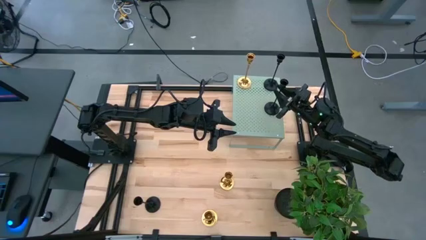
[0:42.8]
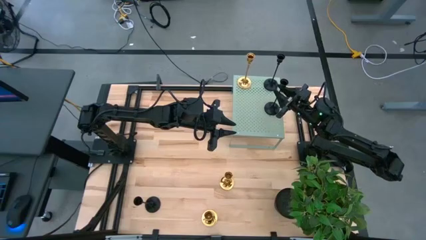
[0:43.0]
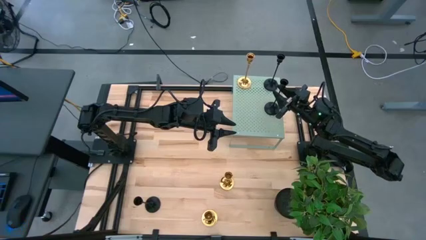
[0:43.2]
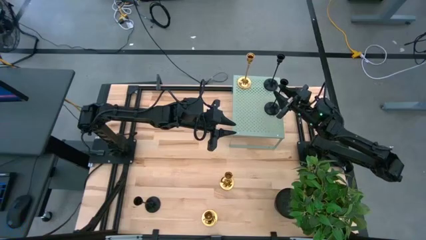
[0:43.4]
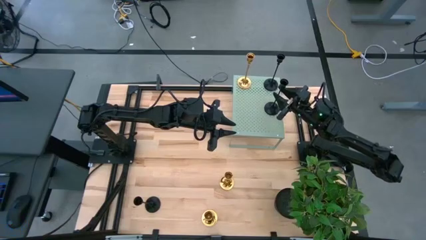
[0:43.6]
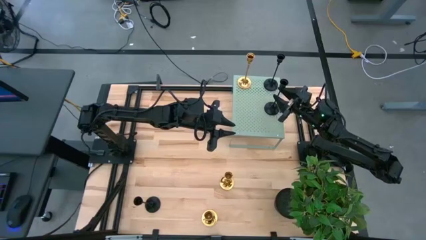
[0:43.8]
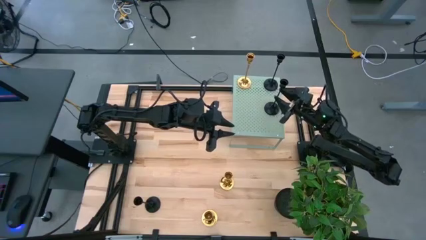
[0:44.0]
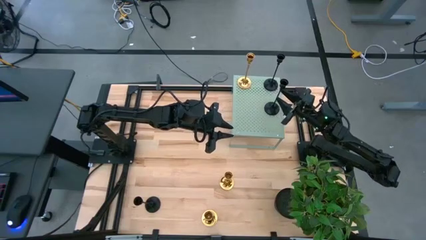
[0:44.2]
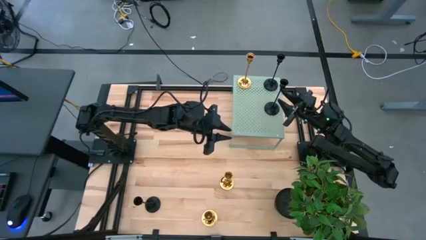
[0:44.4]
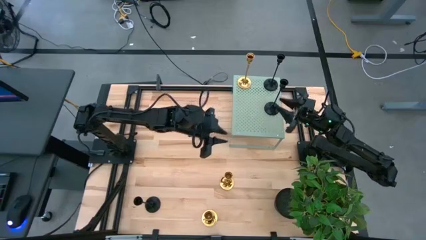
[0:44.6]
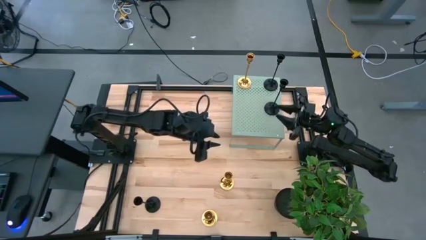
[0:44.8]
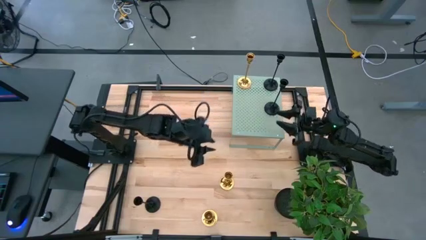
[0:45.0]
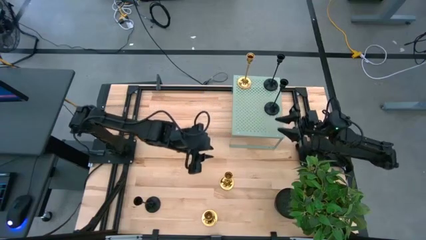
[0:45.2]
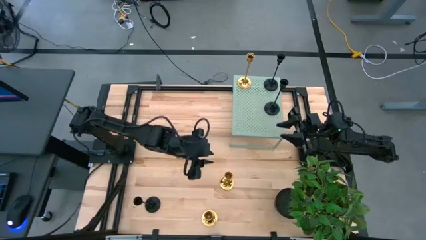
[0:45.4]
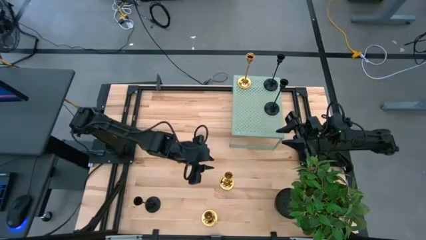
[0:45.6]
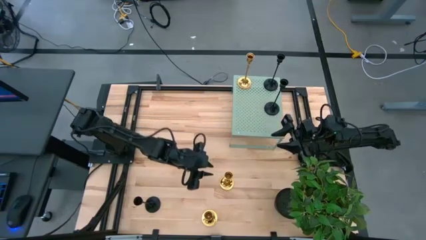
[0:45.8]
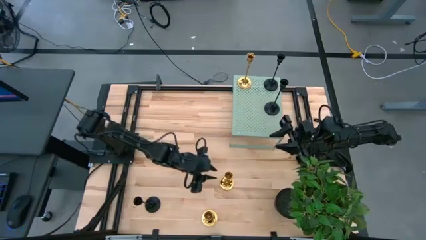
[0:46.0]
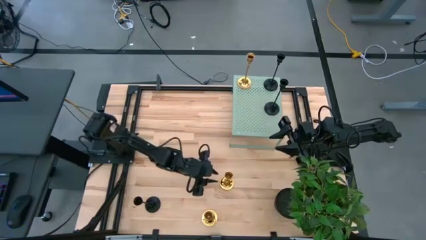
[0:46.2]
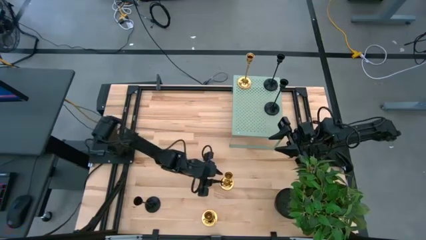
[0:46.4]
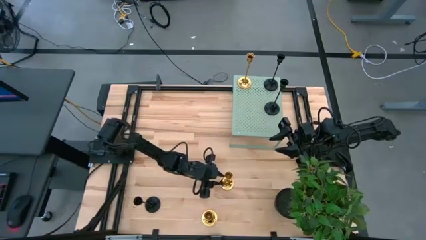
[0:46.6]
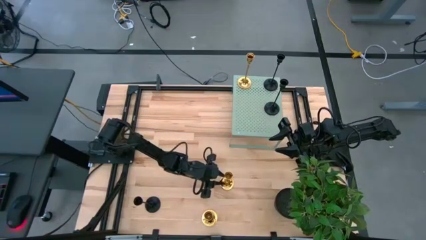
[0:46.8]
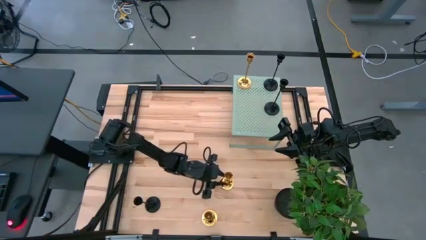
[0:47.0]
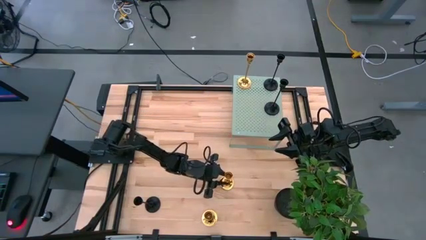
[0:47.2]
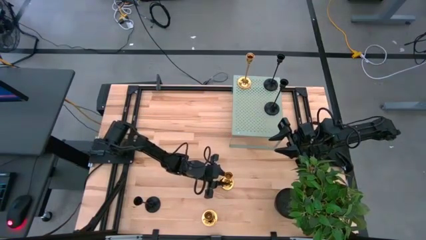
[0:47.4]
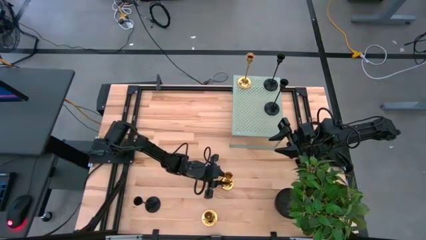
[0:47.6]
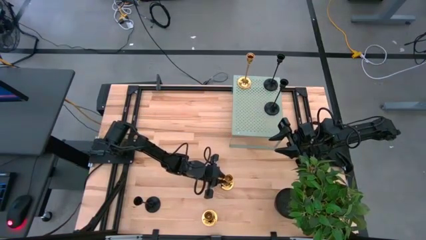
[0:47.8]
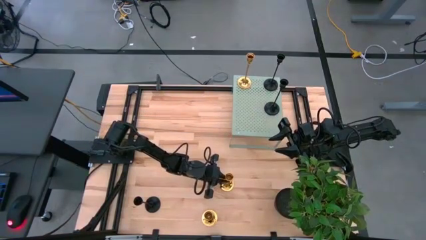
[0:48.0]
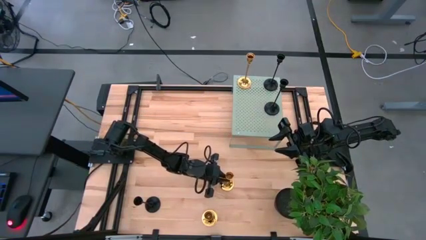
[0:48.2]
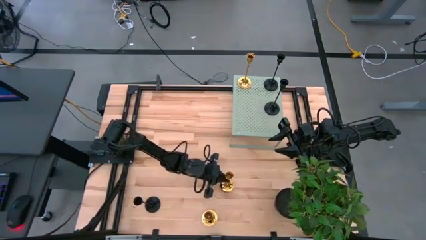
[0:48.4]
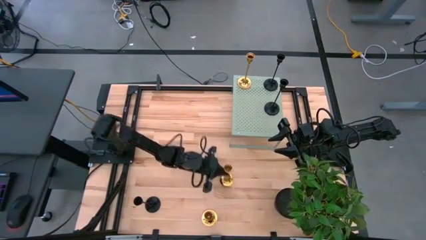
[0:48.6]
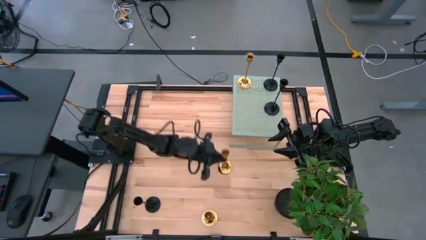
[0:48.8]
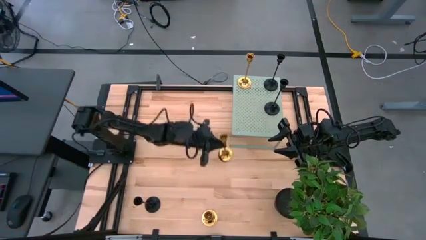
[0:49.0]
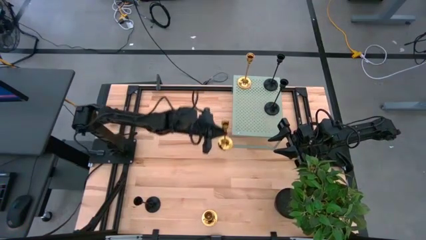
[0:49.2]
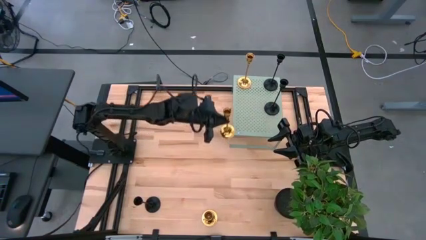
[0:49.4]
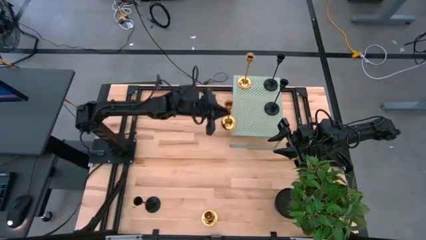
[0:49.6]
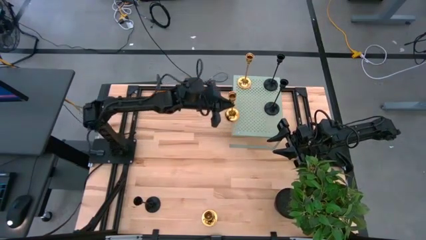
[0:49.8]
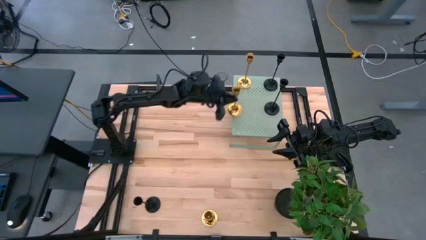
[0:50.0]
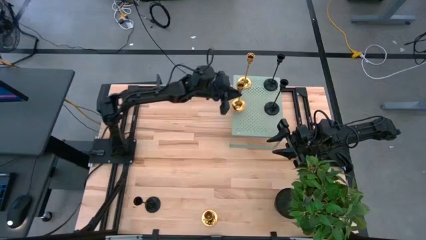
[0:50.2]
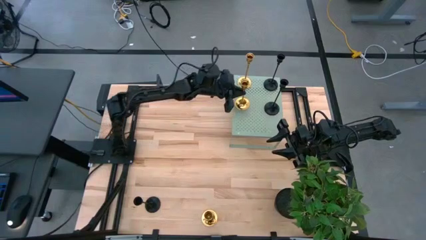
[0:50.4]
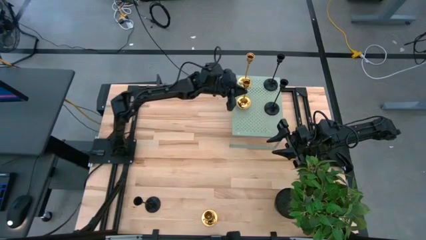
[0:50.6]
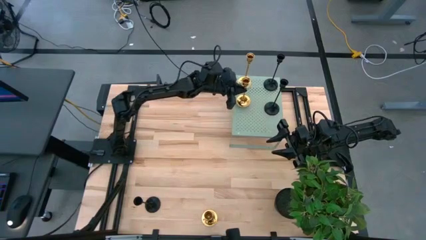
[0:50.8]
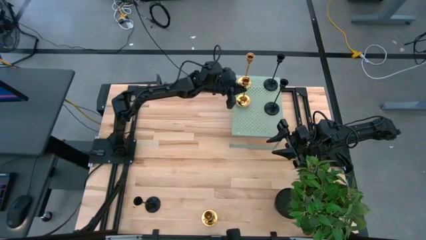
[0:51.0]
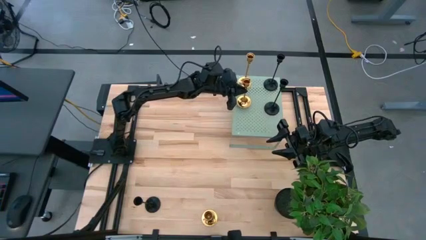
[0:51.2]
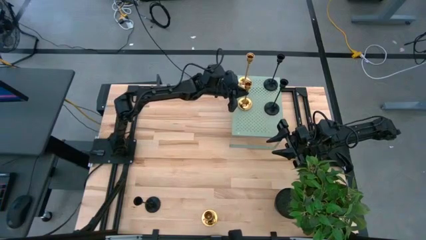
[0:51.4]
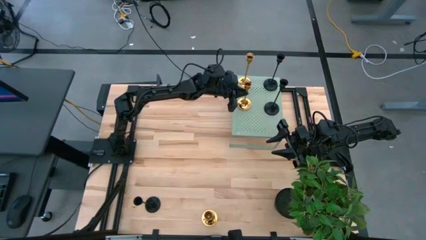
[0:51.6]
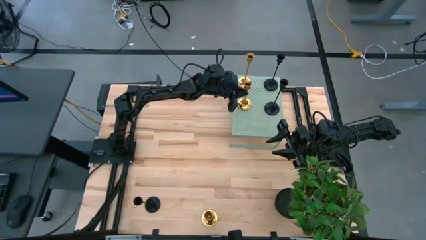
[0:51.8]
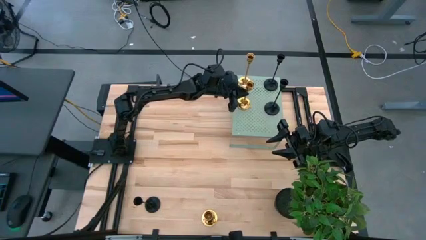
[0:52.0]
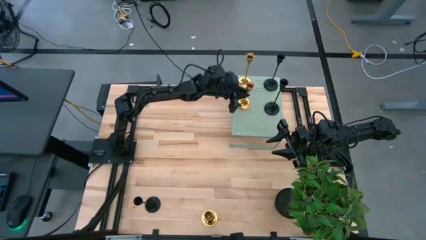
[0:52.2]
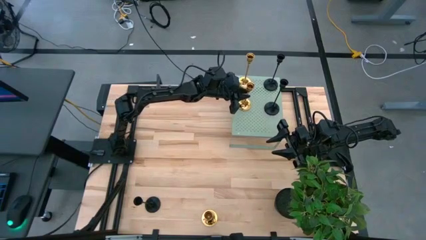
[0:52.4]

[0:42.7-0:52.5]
Task: Pick & Place candle stick holders
Put the top light brown candle holder on top of the shelf aligned with the other light brown candle holder
